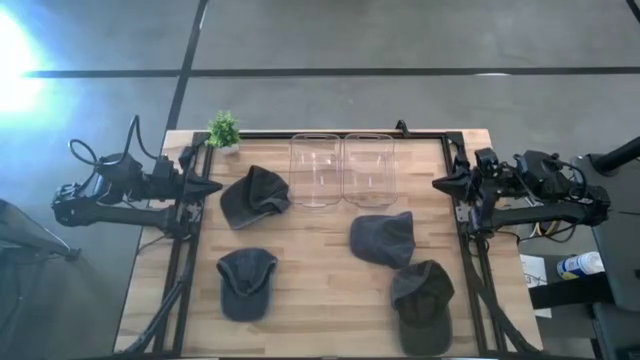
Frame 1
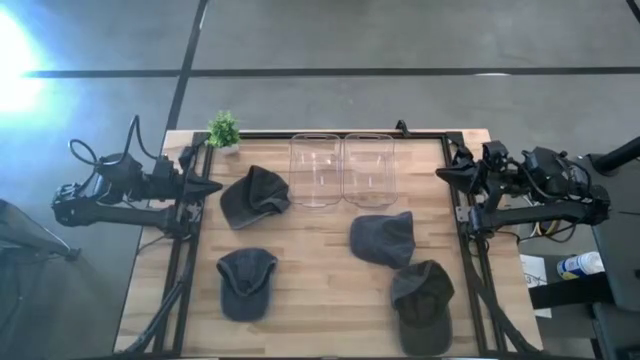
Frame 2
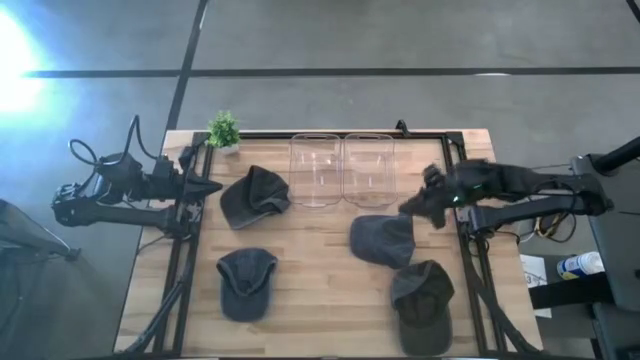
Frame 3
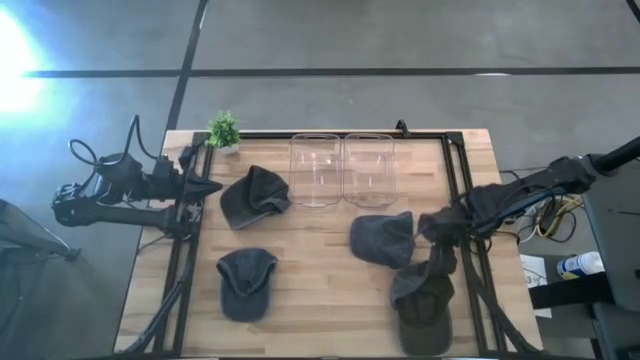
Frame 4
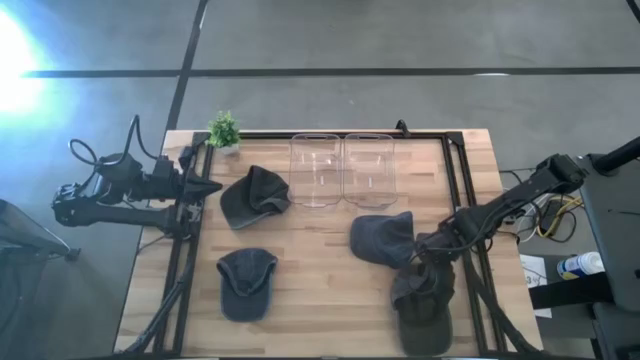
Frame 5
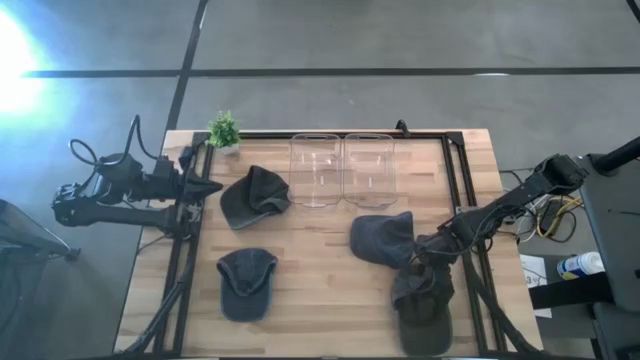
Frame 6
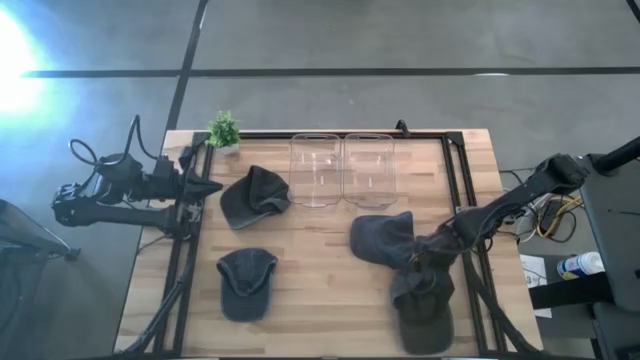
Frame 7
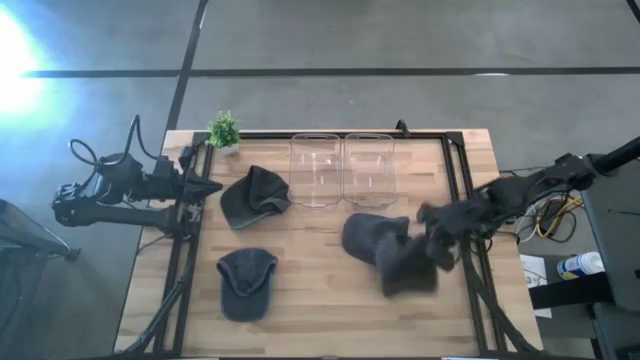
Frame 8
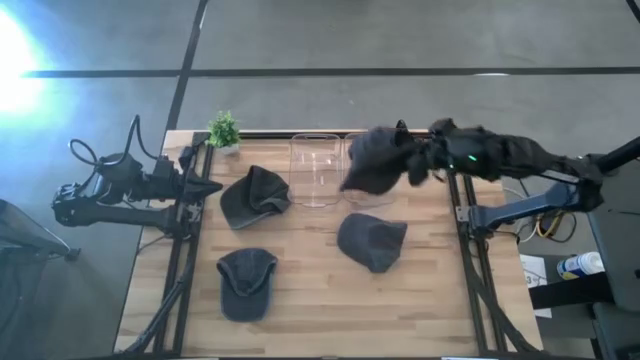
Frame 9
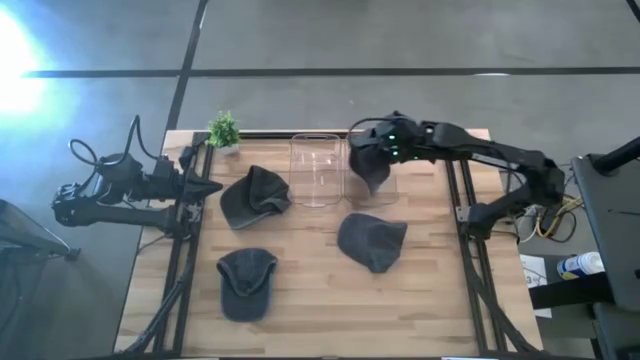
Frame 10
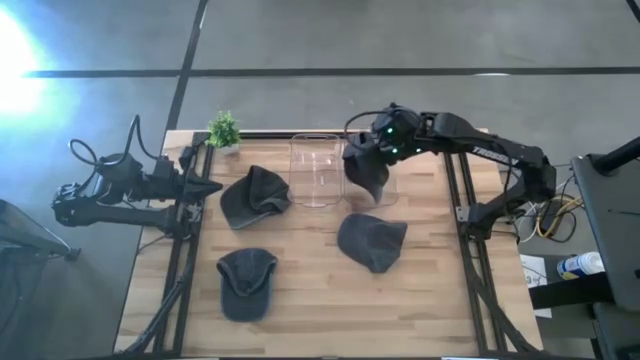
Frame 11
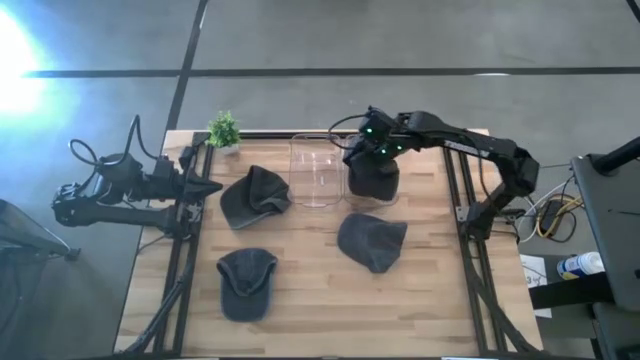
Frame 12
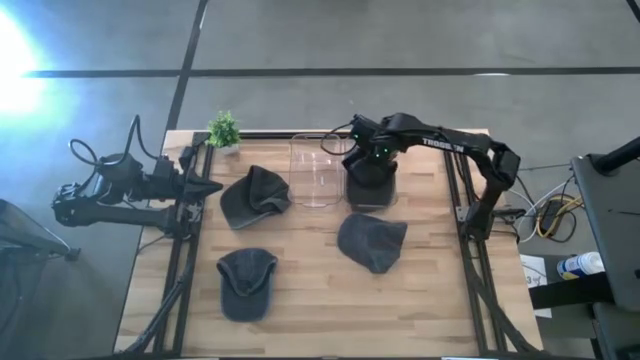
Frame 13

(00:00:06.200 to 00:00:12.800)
Task: Pick & Place hat
Put the bottom black cap into the right transparent bin

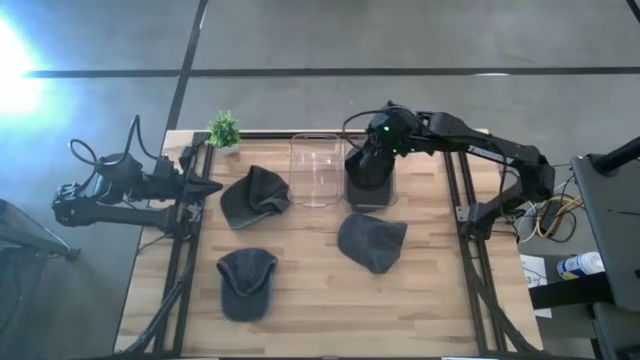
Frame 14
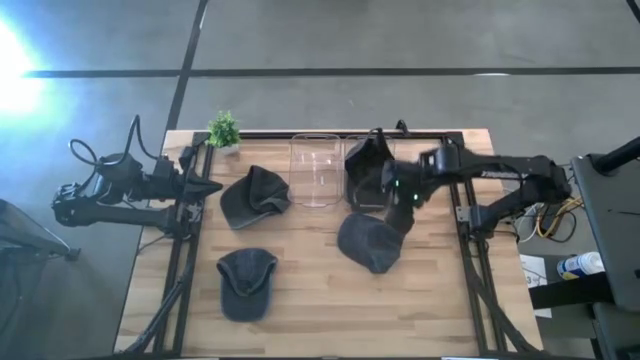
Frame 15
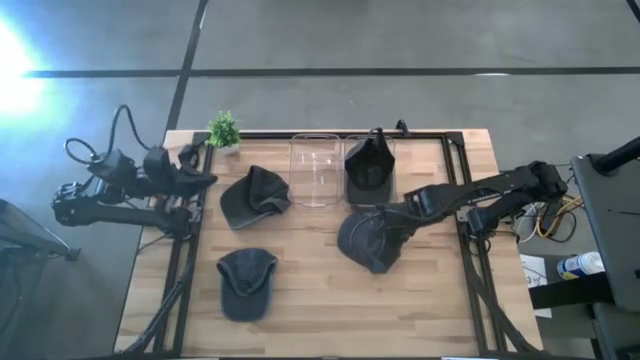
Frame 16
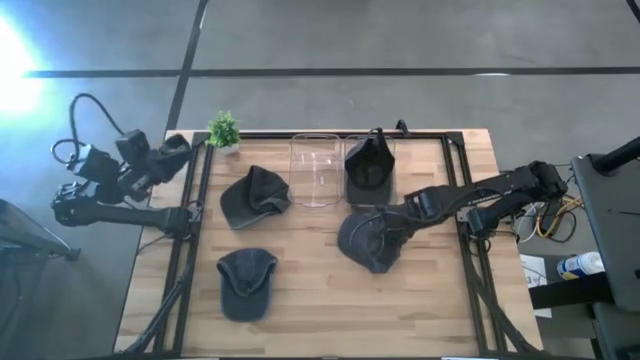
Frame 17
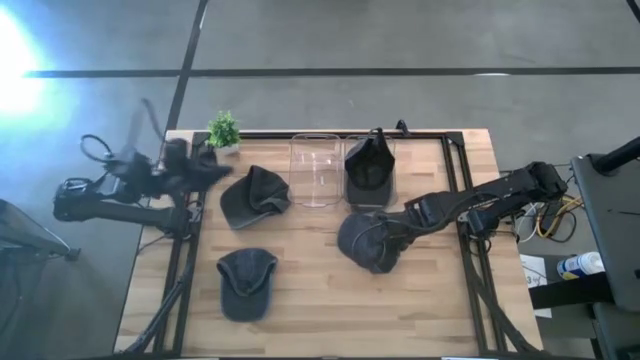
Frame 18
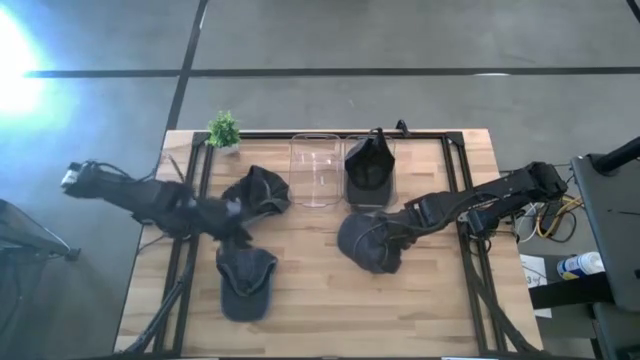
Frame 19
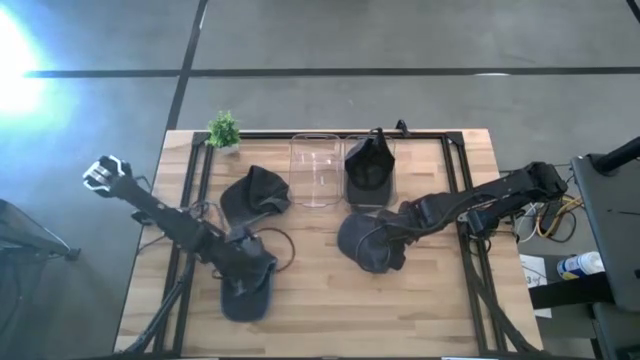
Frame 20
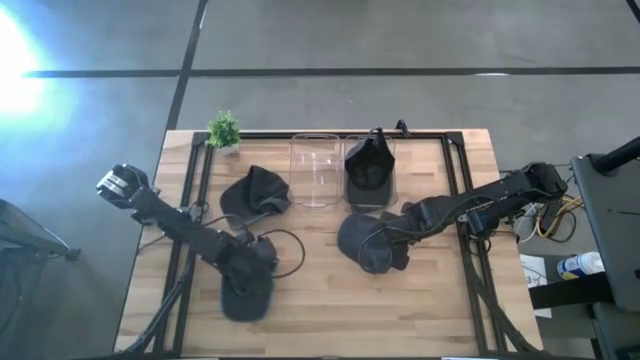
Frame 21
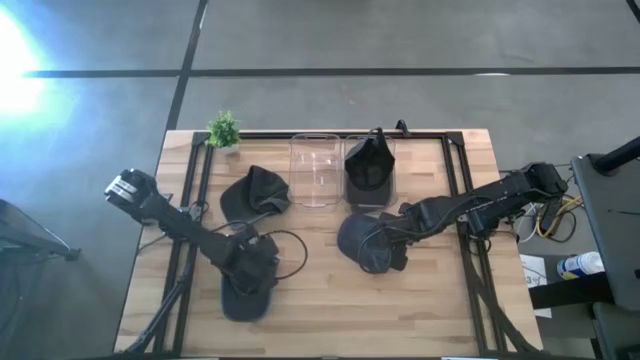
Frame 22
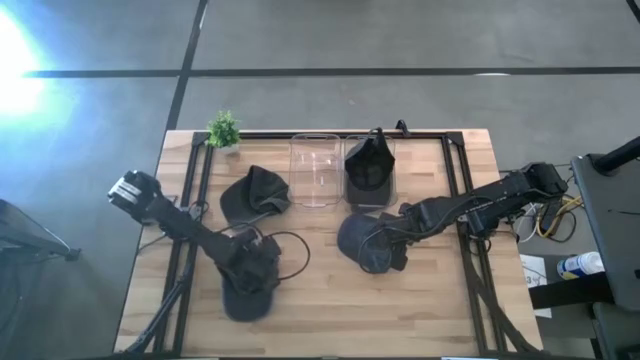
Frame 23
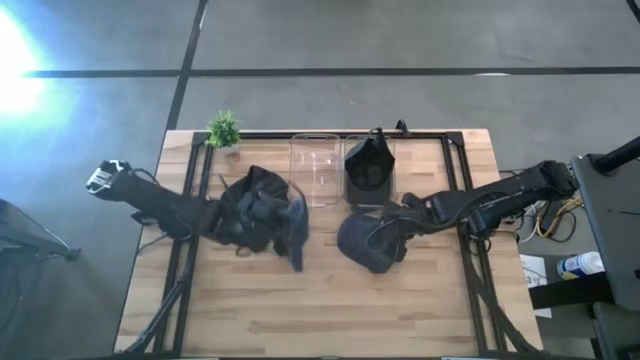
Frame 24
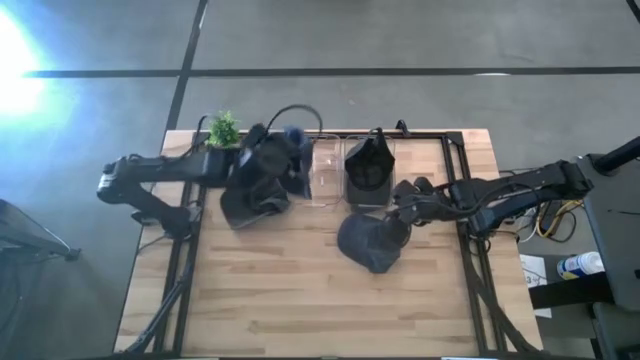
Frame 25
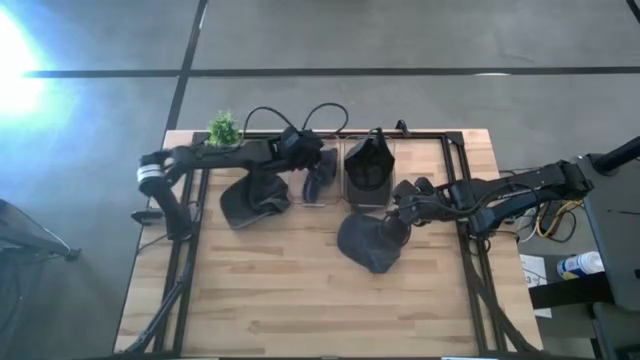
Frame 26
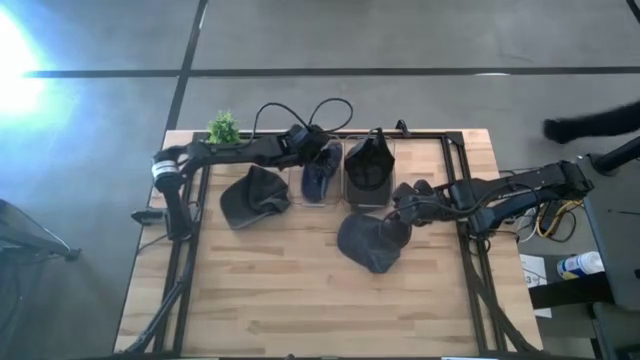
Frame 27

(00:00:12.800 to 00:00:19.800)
Put the bottom blue cap into the left transparent bin

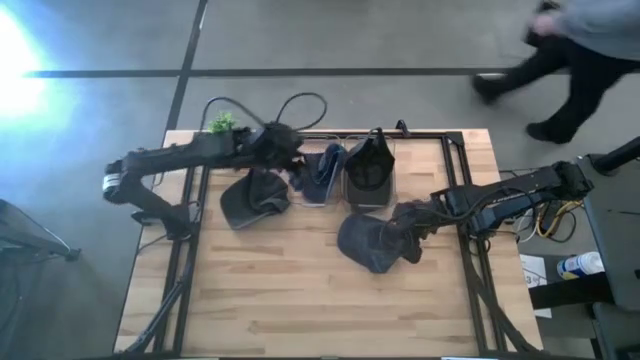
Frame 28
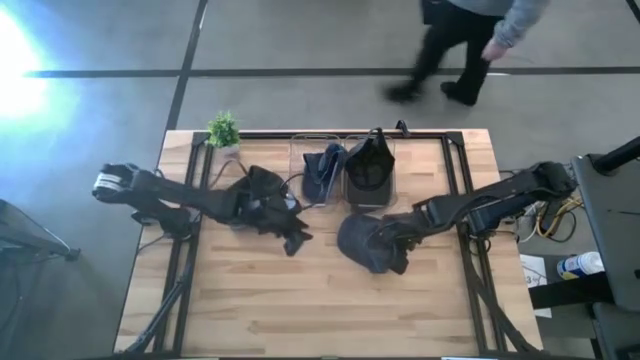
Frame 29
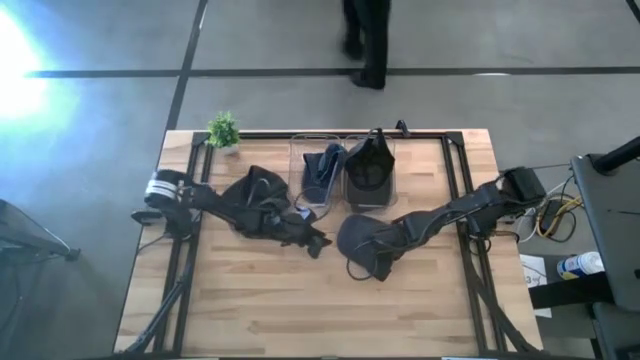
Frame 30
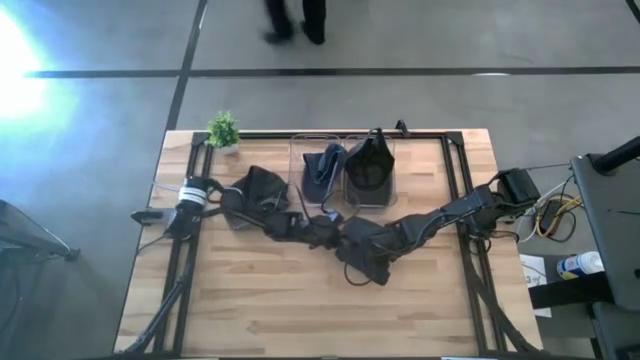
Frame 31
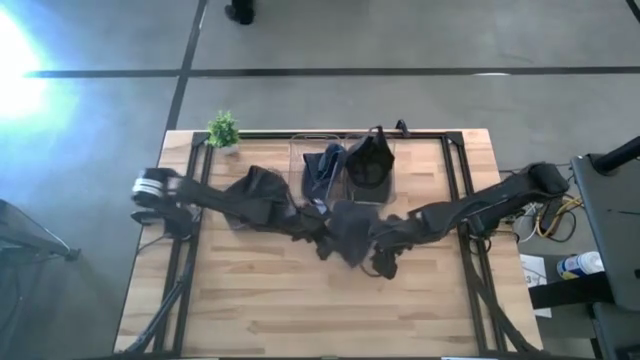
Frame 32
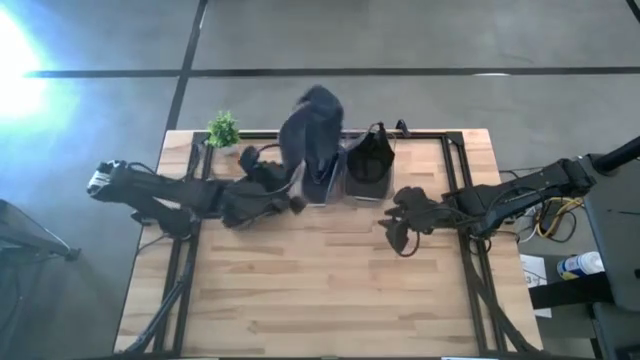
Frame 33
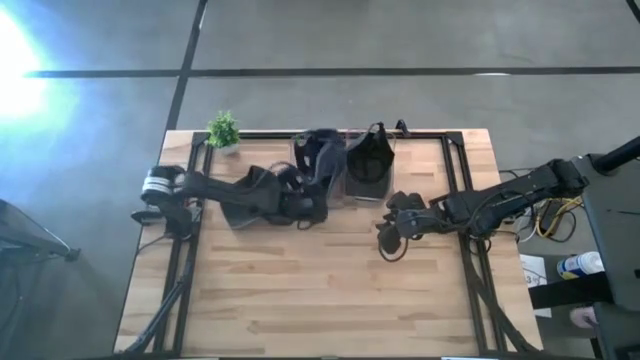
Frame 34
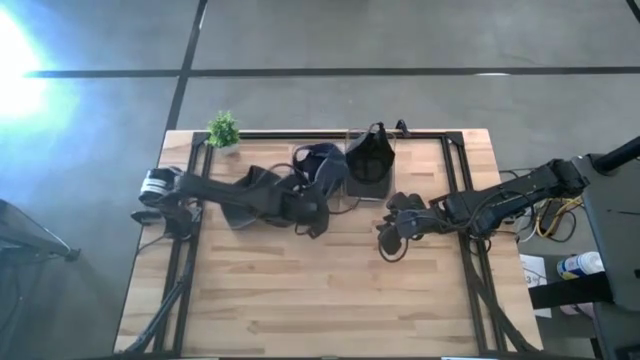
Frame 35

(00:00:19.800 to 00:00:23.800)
Put the blue cap into the left transparent bin

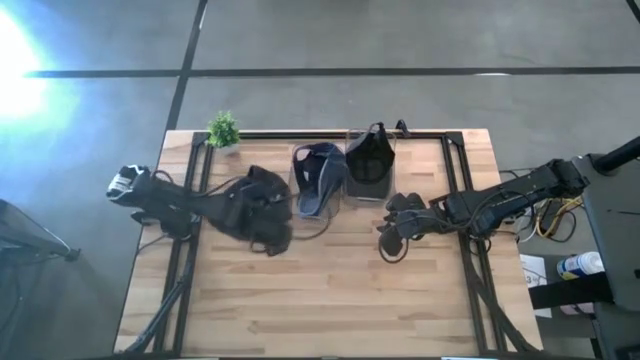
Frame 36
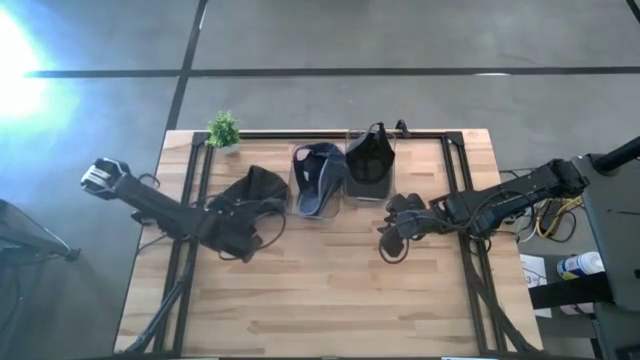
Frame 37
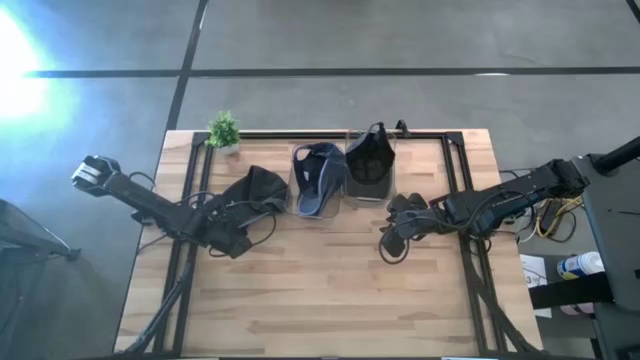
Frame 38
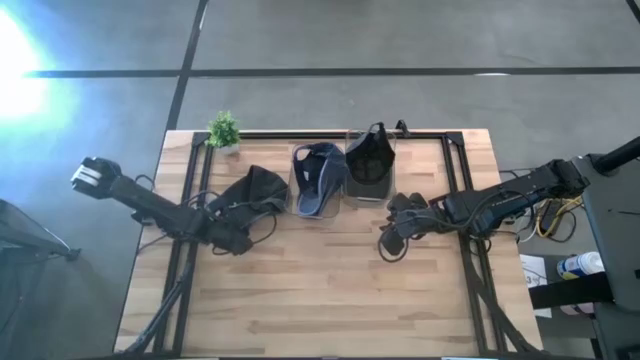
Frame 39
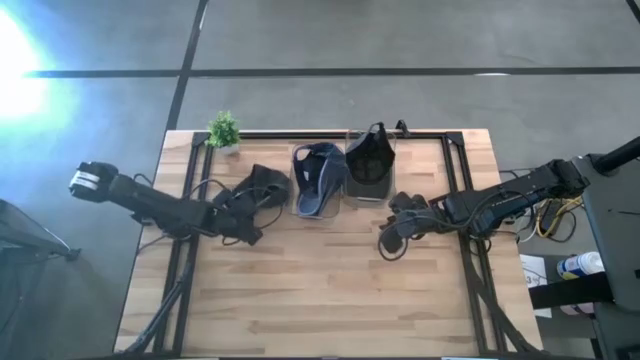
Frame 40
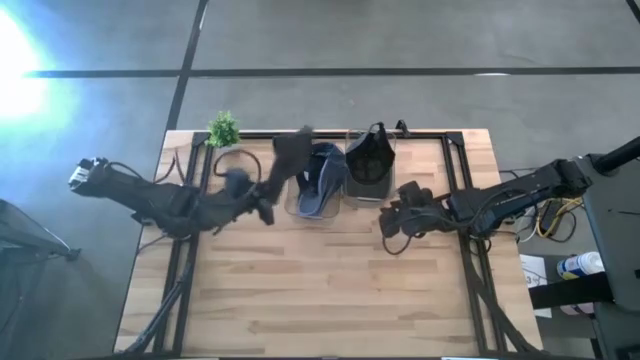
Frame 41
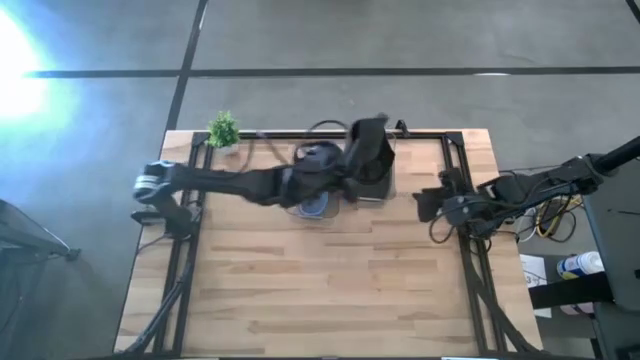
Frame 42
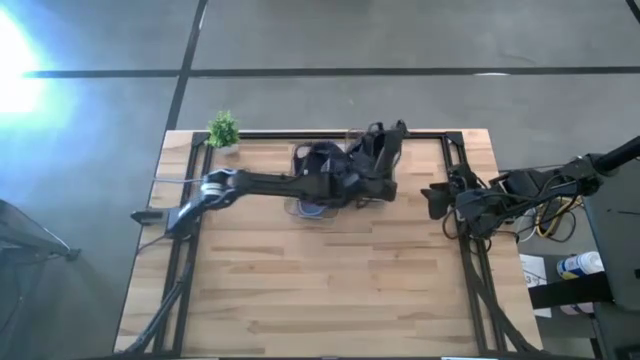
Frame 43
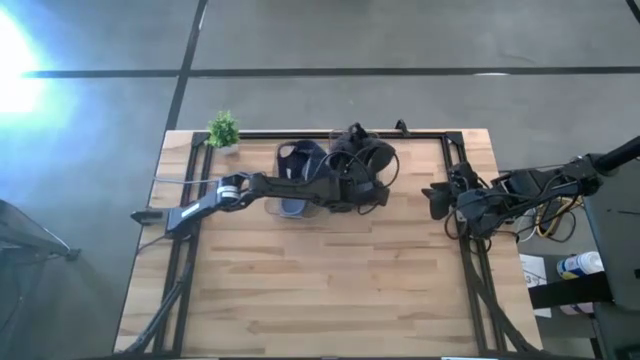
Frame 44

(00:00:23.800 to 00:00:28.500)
Put the black cap into the right transparent bin
